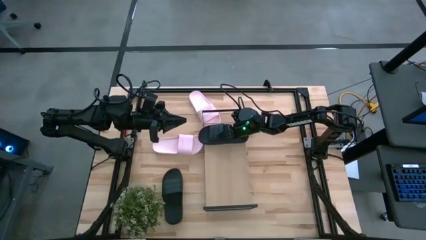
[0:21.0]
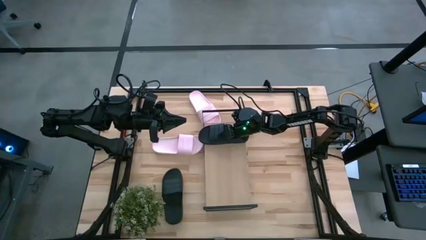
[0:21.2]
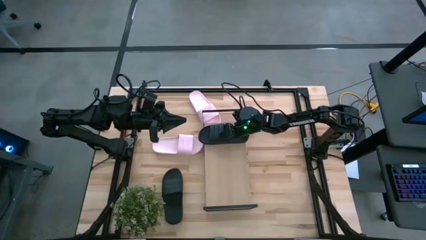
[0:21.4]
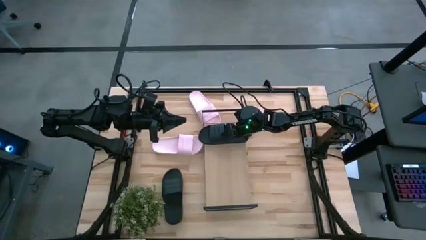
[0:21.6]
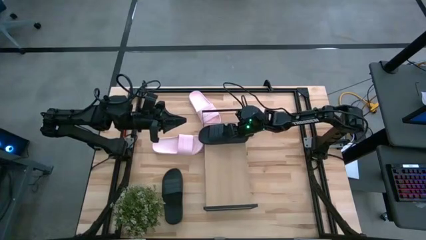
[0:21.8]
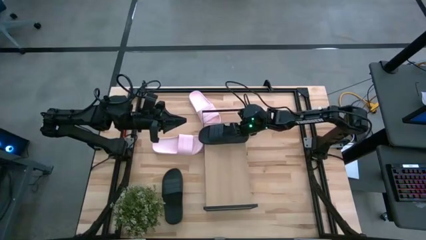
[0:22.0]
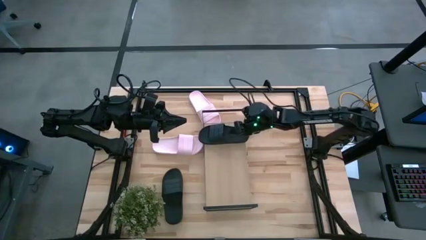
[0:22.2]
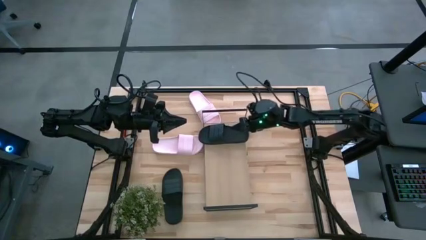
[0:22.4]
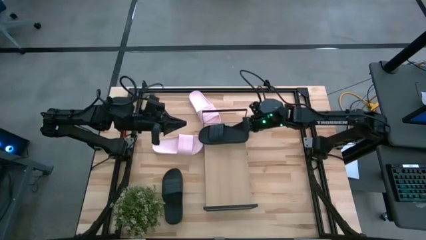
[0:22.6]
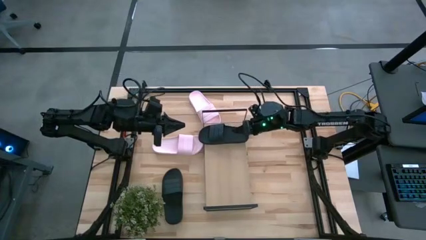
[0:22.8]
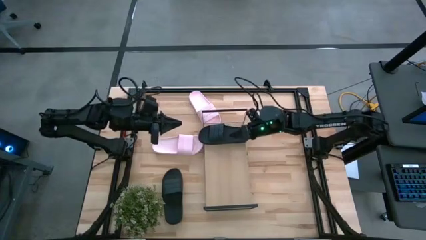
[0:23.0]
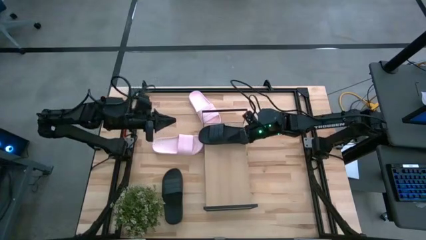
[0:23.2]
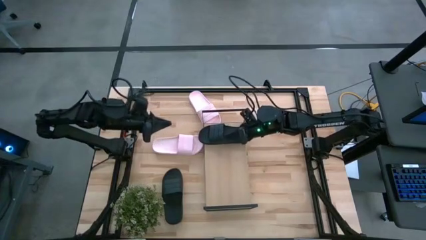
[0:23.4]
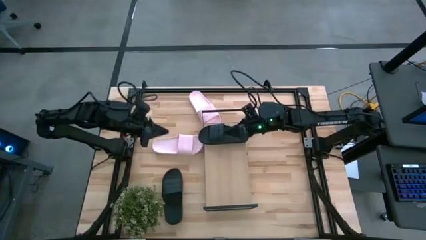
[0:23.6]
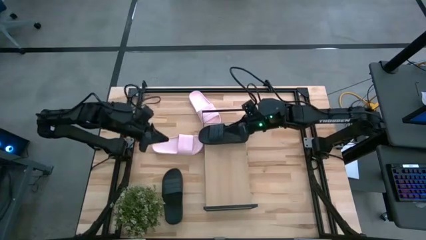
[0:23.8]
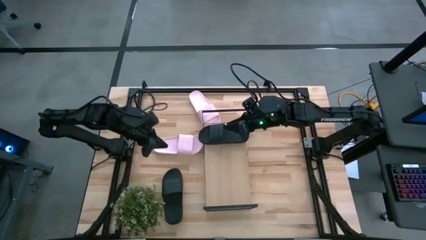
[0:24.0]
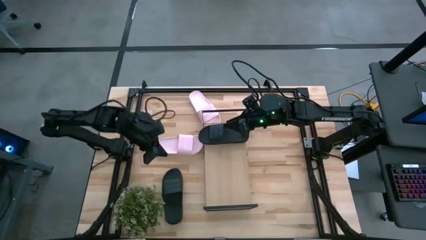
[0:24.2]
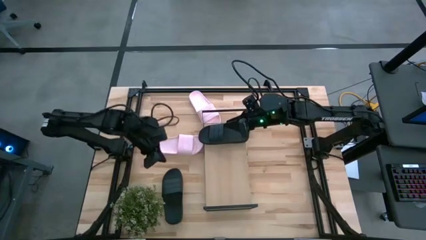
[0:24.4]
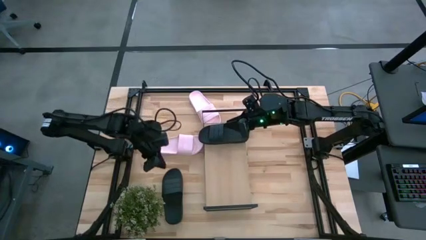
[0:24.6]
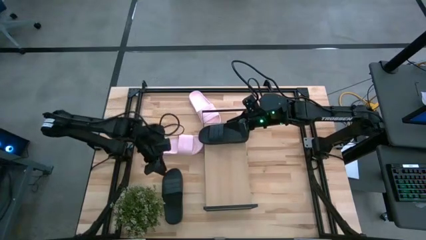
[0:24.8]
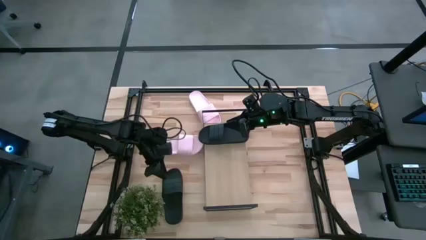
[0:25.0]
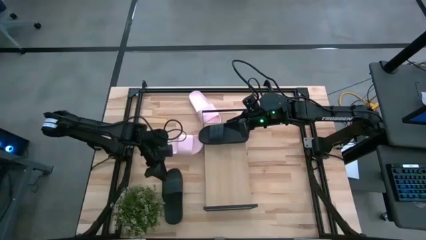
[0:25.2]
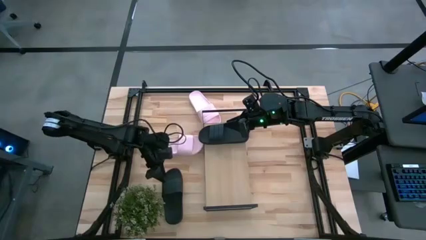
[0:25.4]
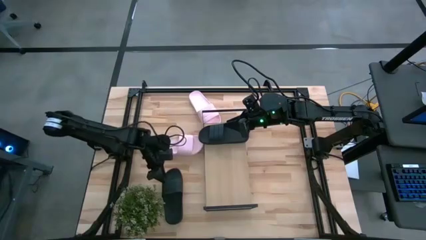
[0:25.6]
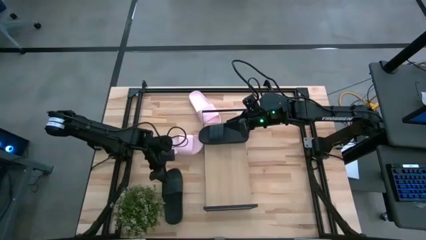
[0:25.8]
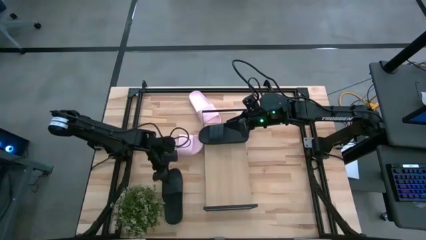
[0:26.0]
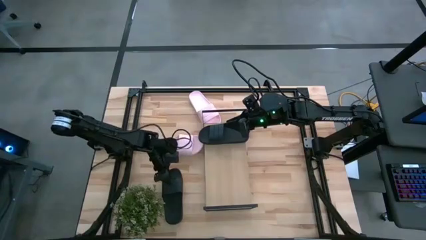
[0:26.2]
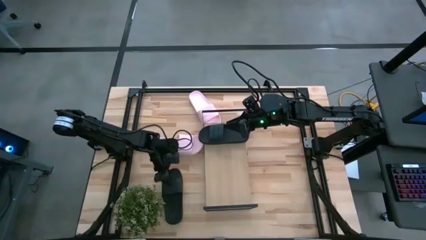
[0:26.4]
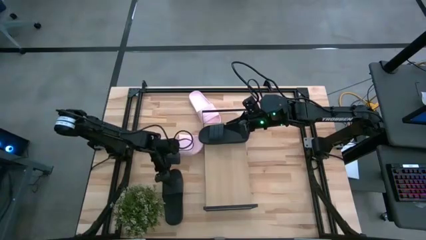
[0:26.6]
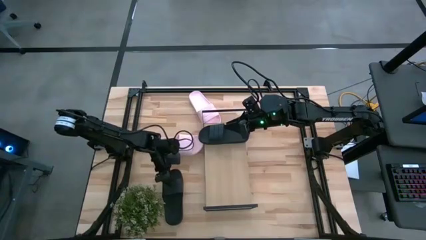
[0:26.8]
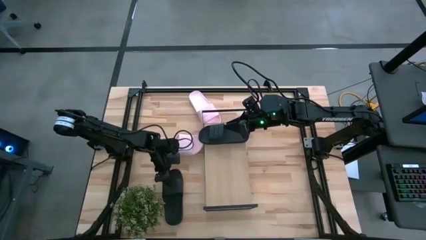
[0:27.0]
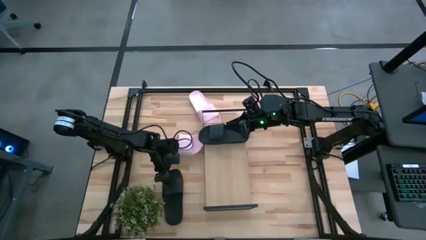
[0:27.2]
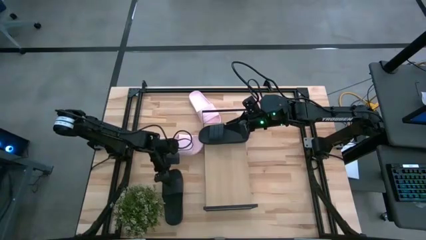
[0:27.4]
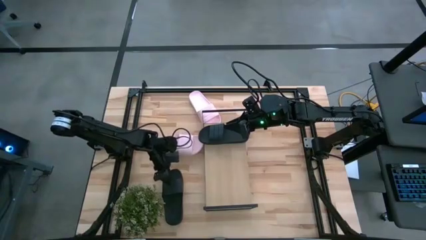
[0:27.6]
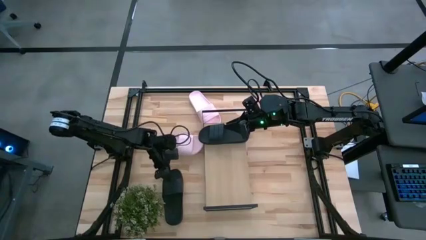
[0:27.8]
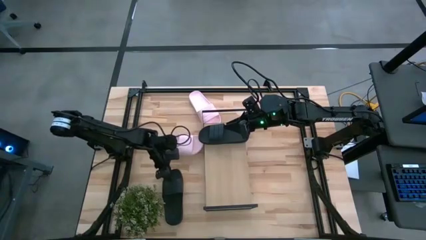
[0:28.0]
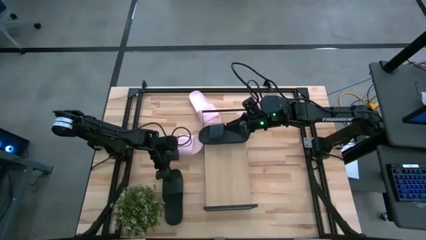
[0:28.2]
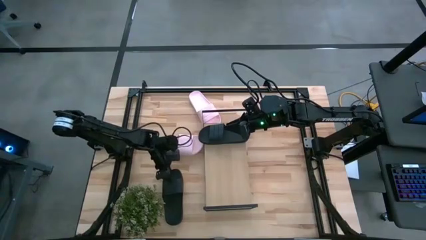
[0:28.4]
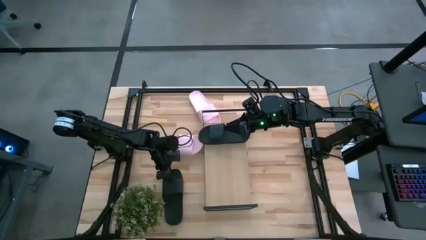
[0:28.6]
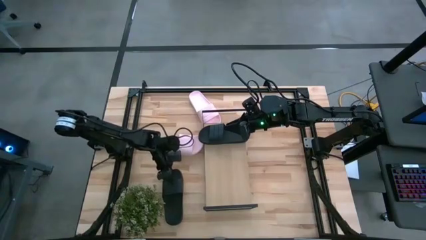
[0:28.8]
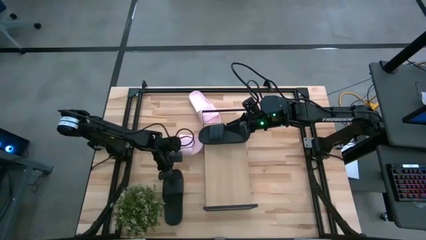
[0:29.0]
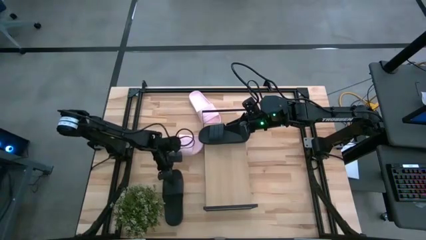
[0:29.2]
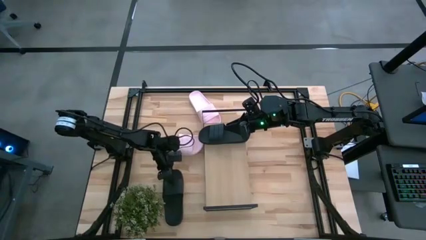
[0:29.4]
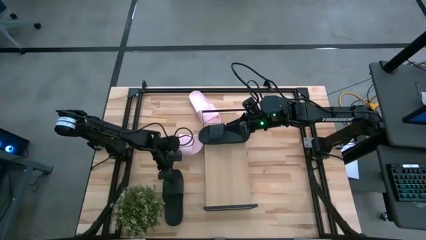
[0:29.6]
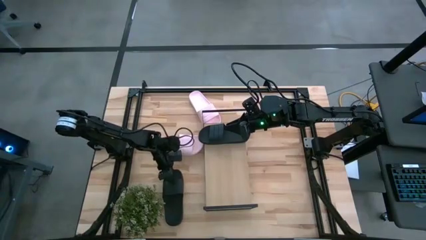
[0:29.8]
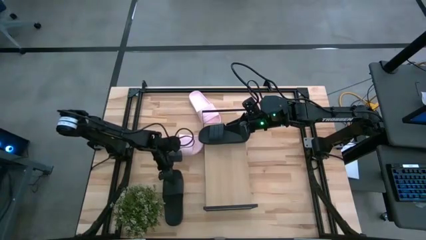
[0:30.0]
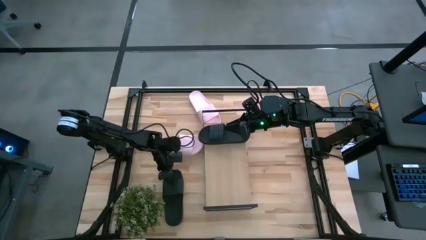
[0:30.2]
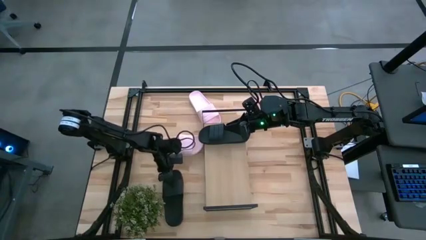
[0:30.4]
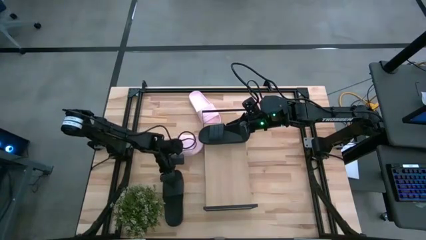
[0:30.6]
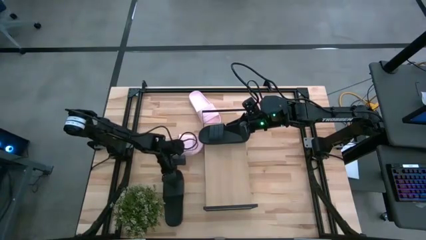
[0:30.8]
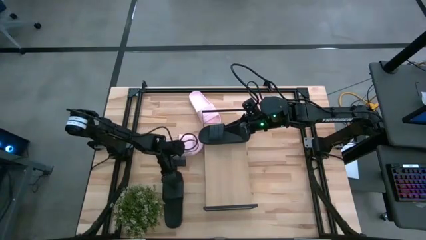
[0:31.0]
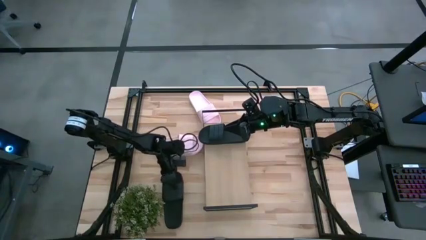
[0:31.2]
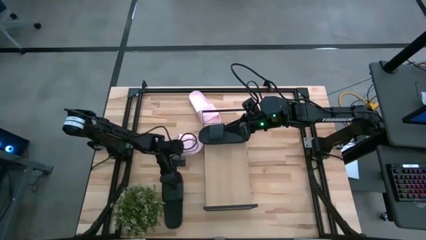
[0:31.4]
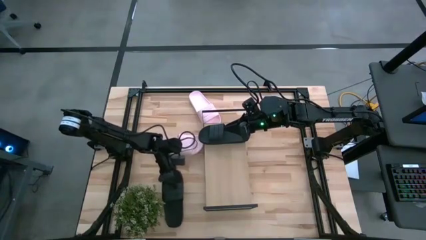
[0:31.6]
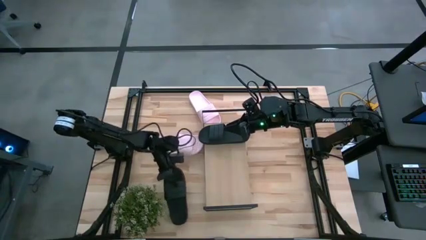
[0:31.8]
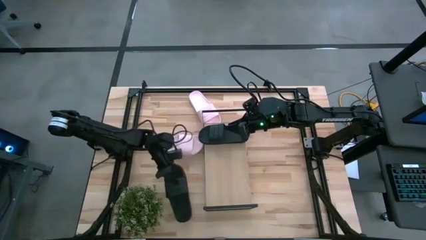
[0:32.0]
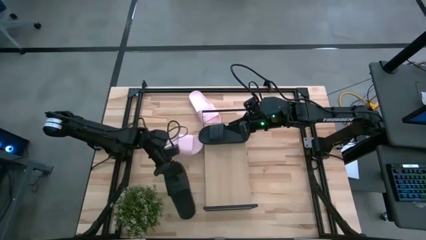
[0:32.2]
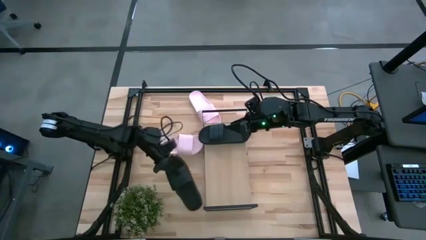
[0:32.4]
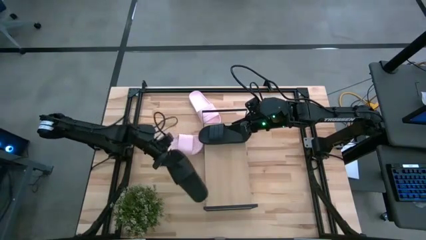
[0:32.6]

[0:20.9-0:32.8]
Task: Pick and place slides into the shelf
Put the black slide on the shelf
